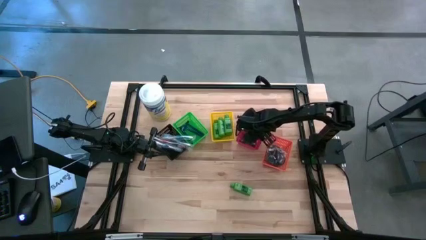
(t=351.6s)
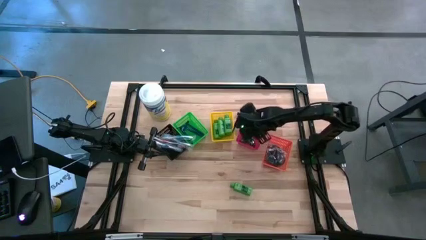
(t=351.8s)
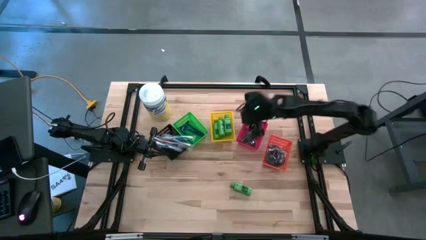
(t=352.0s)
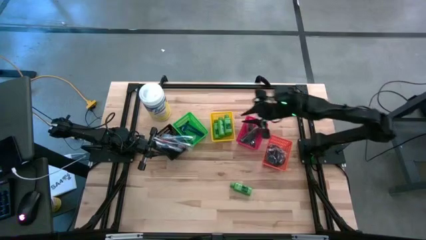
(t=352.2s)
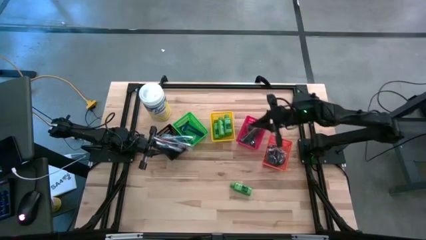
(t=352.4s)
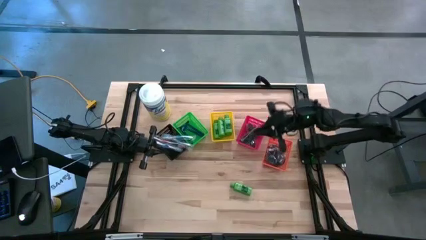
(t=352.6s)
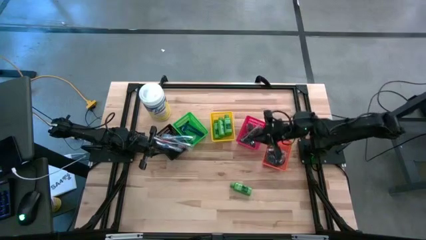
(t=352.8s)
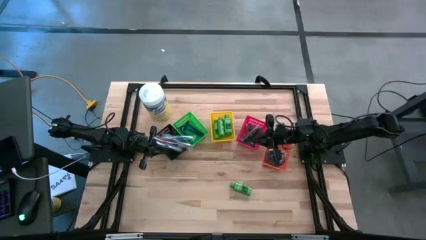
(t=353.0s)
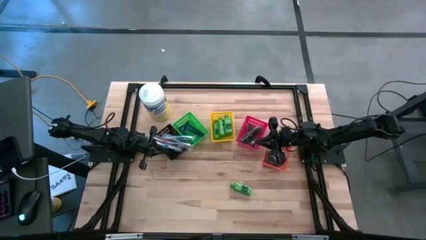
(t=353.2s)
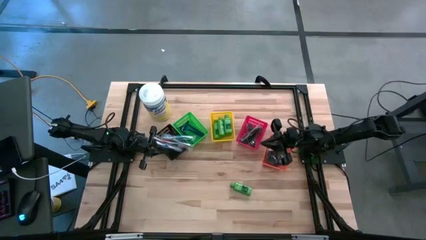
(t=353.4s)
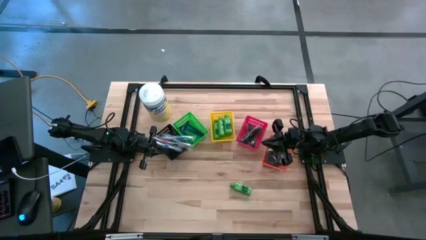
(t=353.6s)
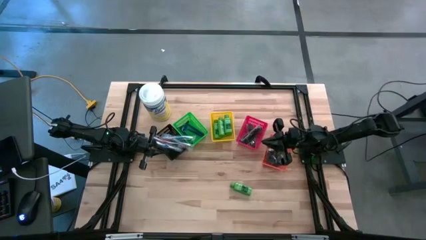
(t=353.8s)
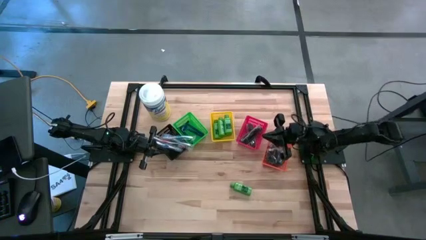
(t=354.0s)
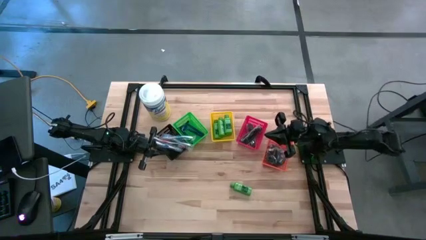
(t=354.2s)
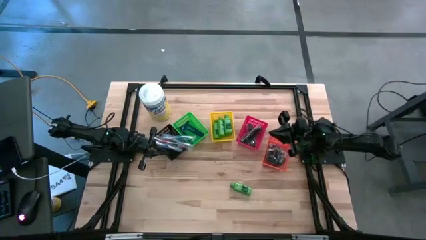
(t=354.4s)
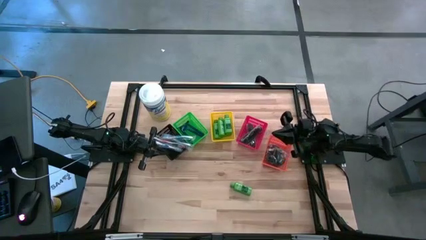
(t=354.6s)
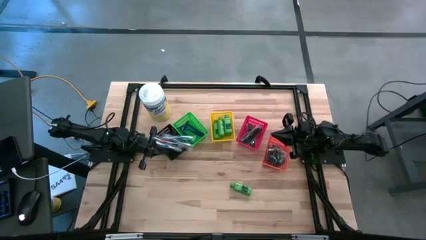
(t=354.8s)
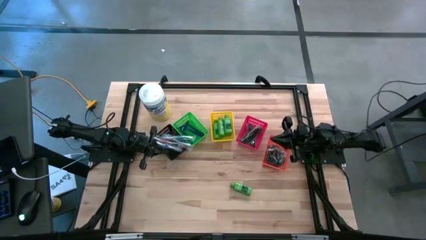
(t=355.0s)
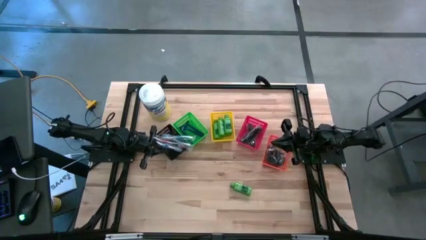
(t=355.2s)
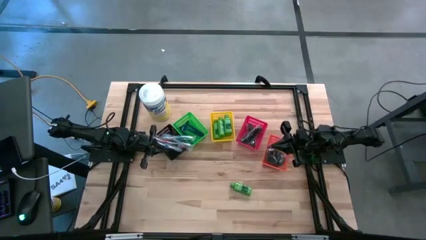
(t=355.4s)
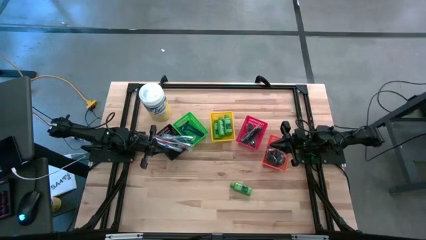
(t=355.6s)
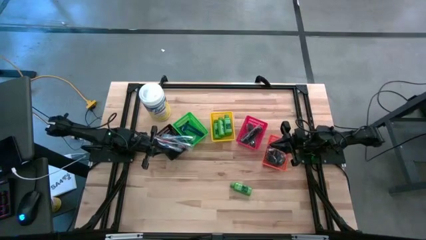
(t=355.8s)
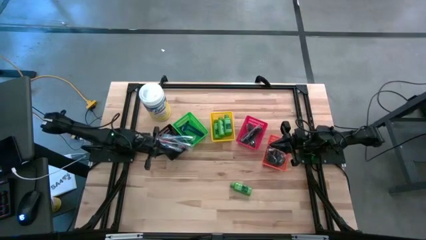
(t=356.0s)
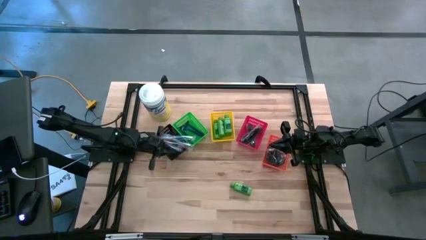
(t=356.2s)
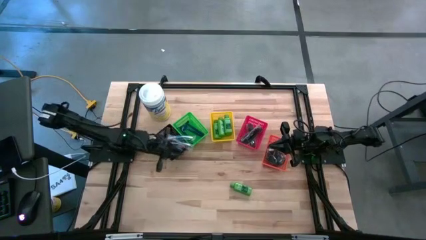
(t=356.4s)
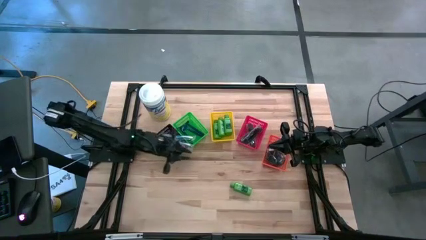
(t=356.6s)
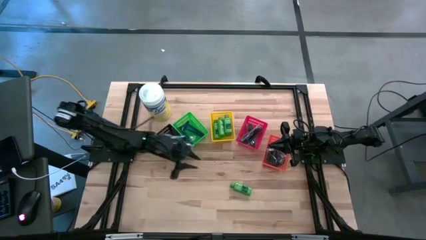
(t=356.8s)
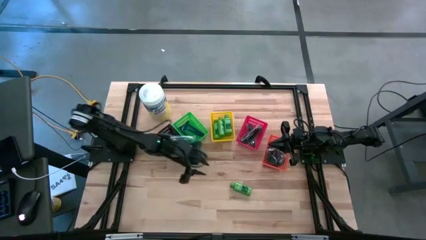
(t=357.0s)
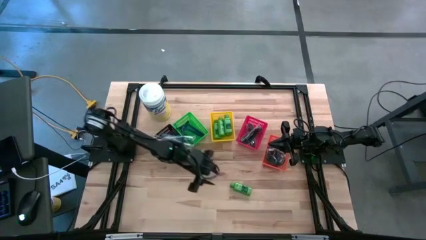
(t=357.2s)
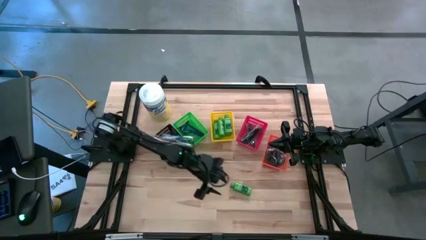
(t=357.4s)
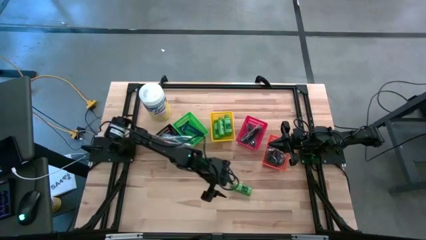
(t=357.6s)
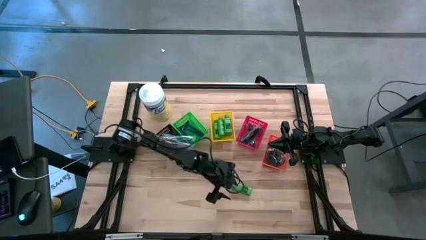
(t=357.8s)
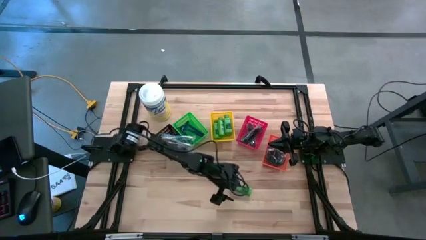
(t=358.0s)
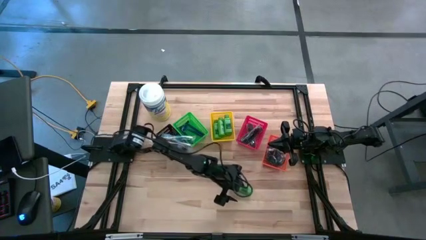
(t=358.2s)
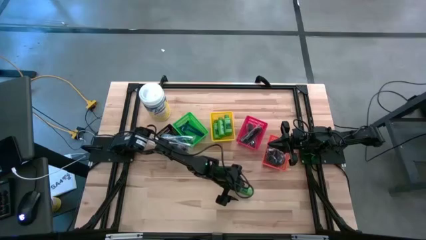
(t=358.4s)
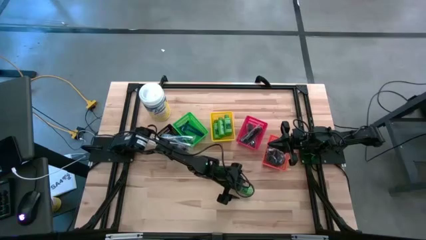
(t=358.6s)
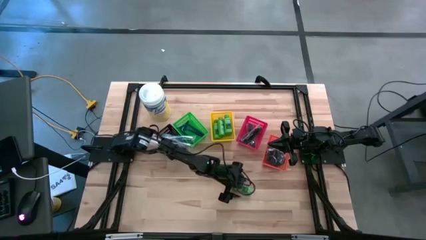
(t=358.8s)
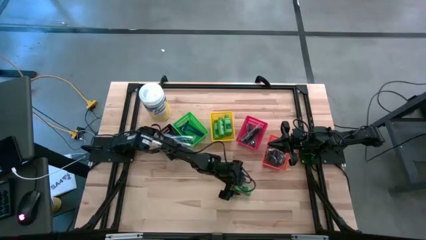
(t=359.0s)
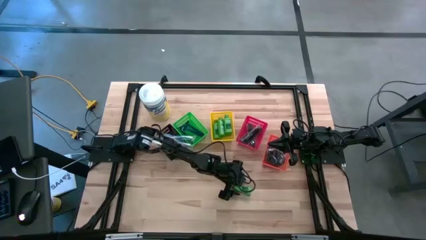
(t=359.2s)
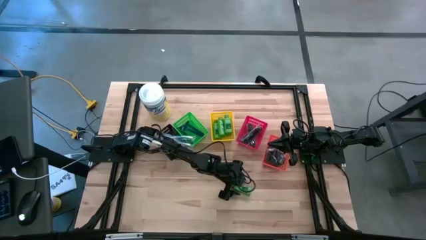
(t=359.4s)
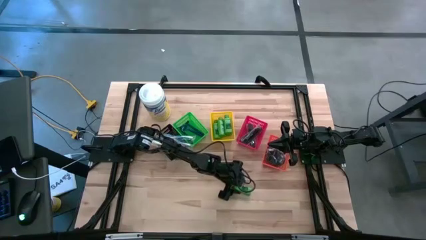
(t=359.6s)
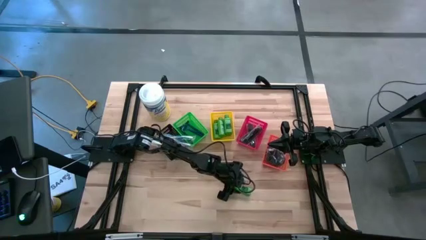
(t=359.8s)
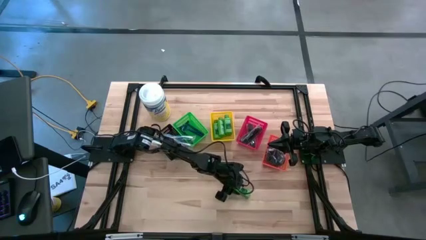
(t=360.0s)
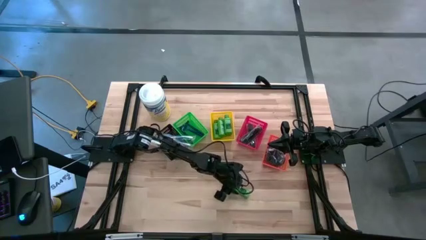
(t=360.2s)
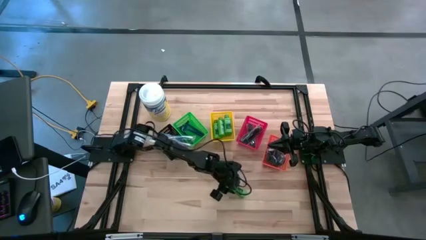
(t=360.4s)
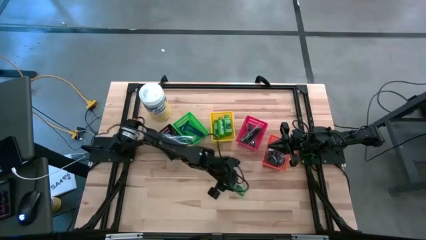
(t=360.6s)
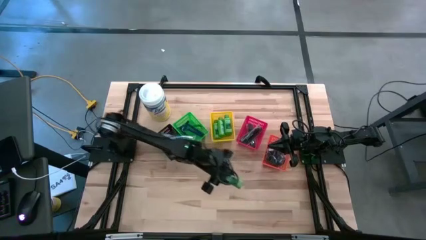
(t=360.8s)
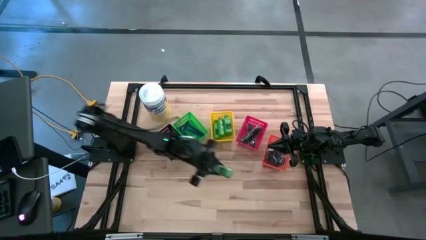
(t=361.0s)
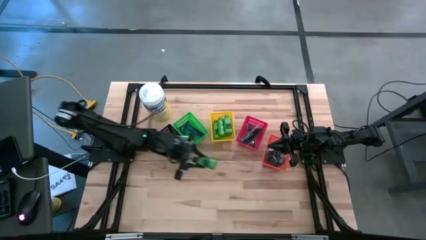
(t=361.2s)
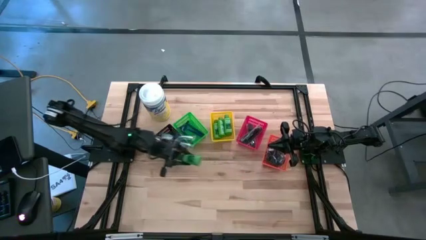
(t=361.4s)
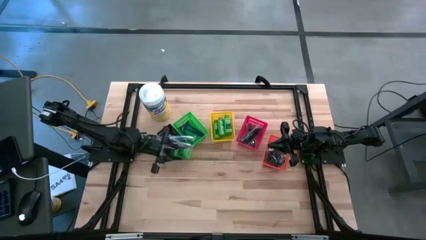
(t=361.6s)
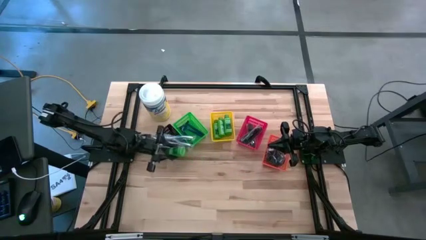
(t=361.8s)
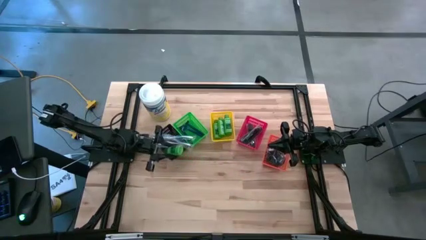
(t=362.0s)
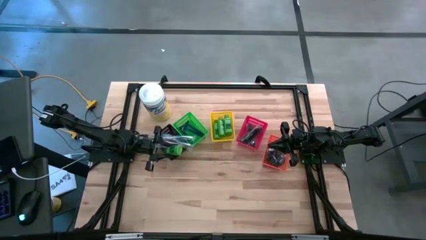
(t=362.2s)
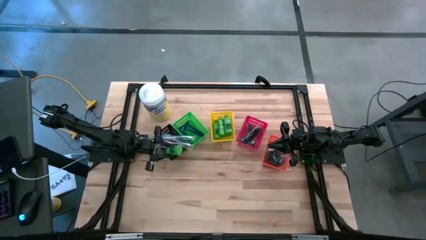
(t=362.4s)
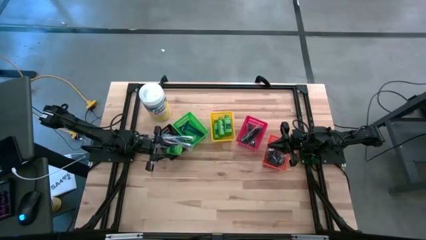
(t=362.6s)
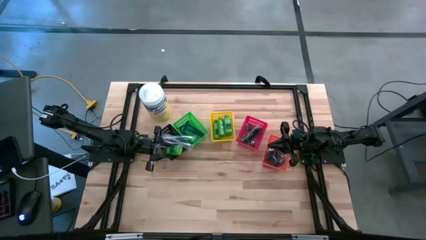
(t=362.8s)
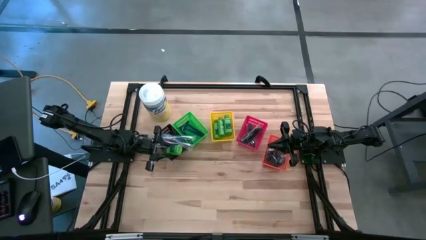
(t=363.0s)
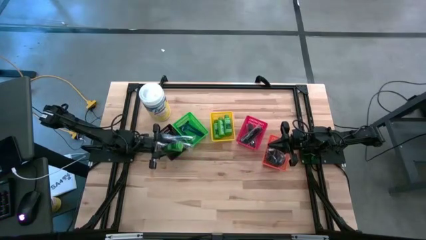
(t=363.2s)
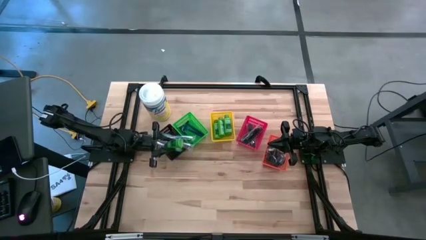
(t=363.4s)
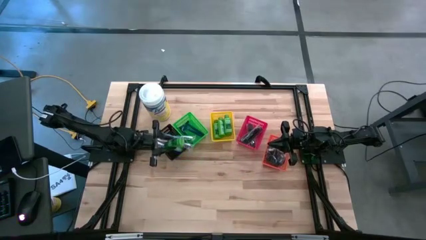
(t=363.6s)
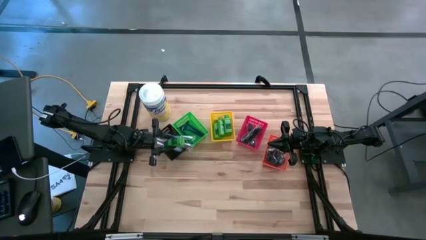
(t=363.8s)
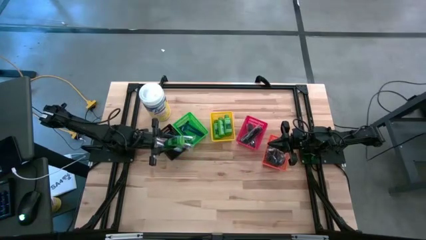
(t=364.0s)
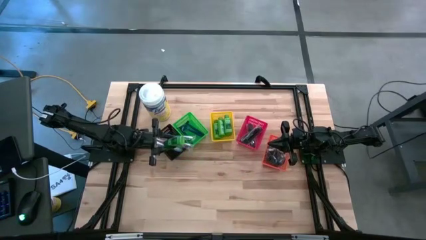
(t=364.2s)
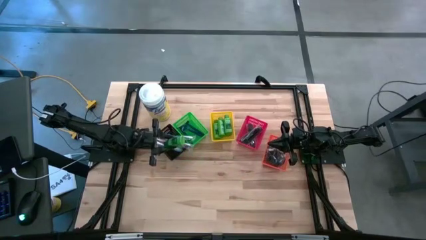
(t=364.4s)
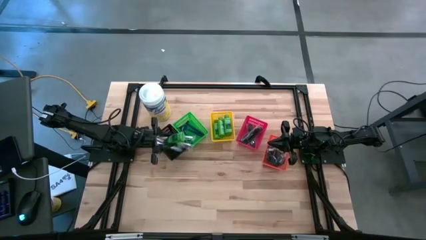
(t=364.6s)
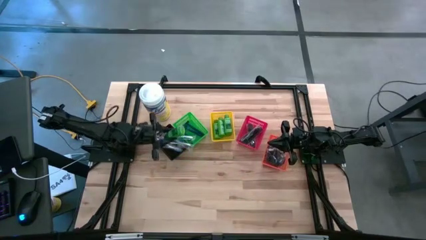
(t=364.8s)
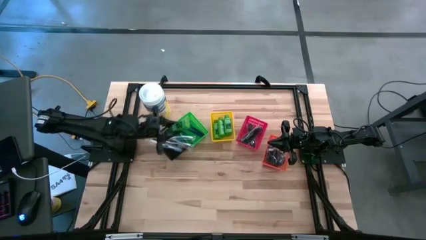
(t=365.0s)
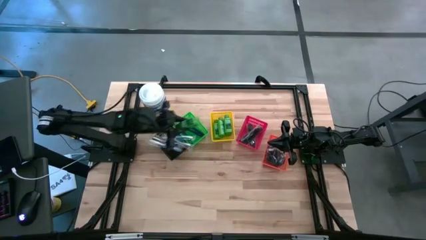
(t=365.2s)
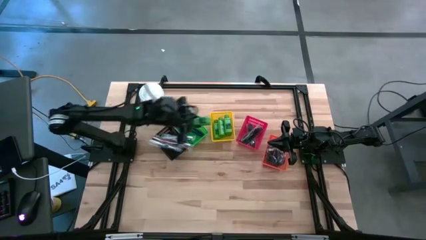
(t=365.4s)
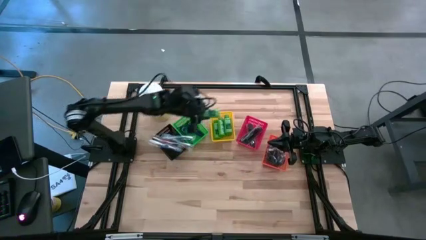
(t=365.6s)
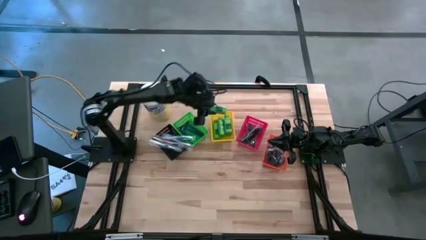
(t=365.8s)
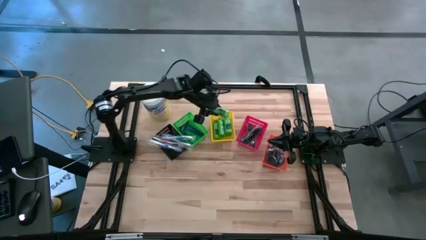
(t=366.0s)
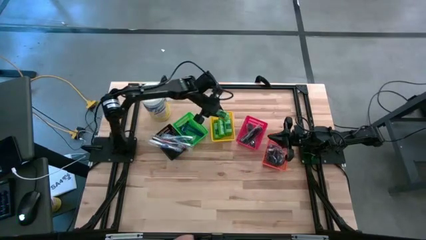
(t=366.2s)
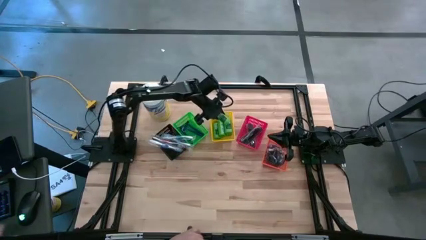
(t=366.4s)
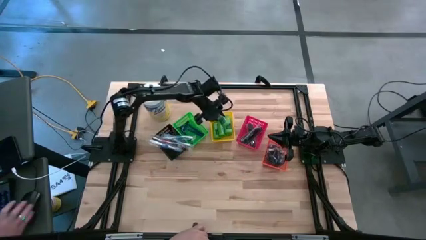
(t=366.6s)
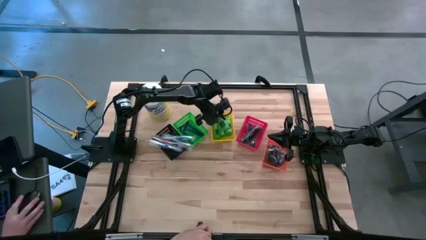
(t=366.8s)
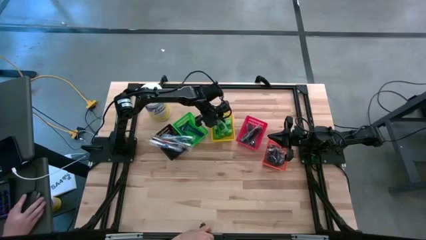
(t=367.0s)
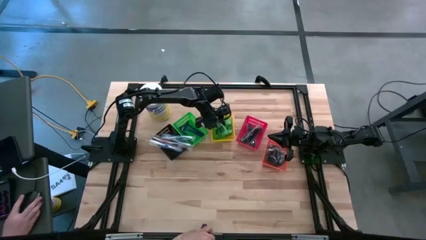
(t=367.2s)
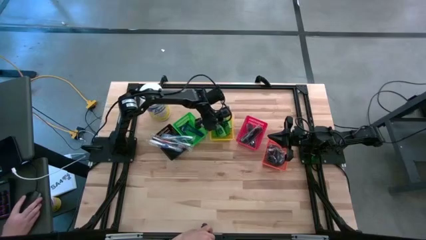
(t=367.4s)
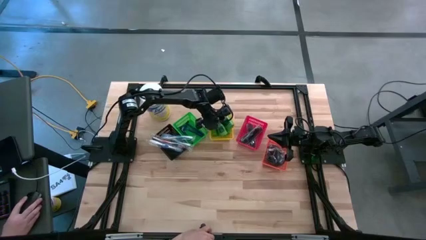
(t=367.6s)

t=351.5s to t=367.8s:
Task: Pick & Place Travel size toiletries
Put the green bottle shampoo into the yellow bin
